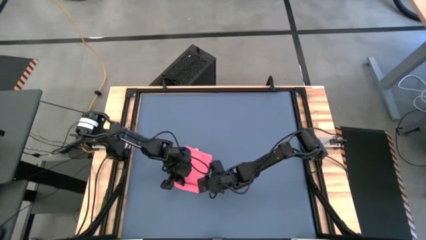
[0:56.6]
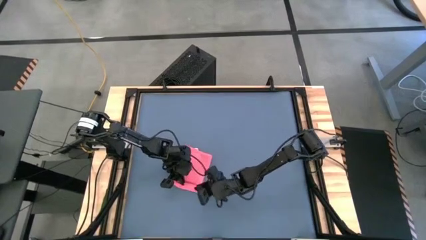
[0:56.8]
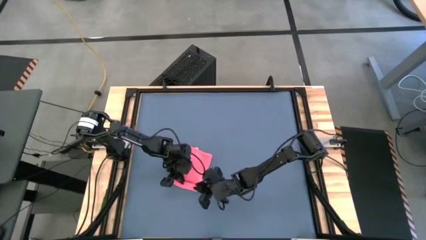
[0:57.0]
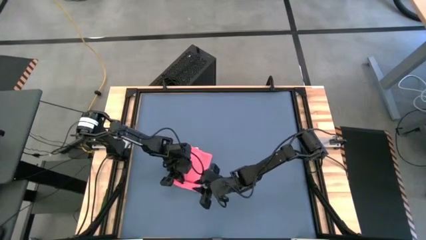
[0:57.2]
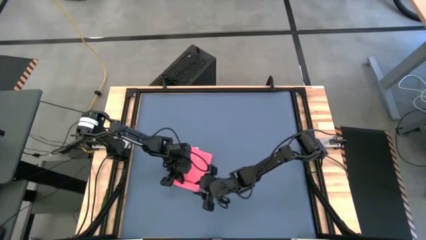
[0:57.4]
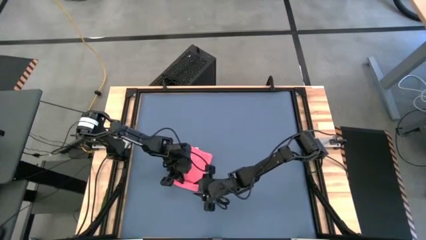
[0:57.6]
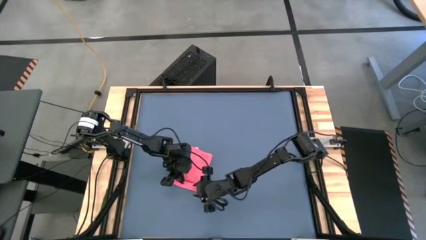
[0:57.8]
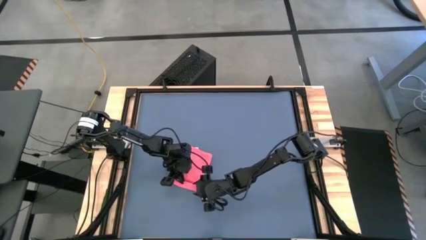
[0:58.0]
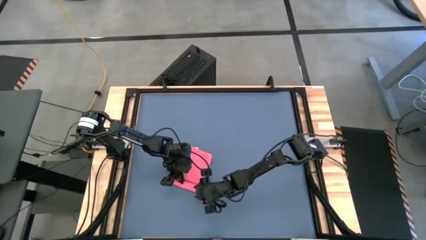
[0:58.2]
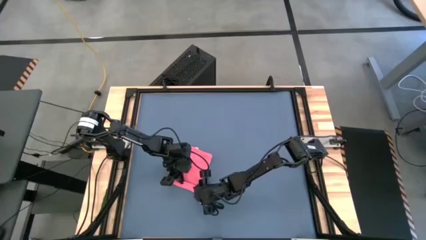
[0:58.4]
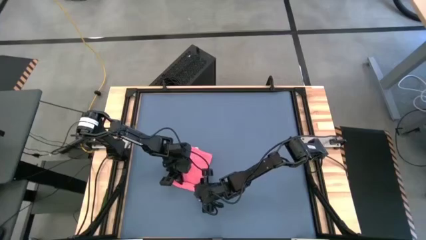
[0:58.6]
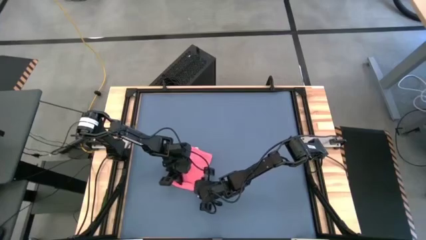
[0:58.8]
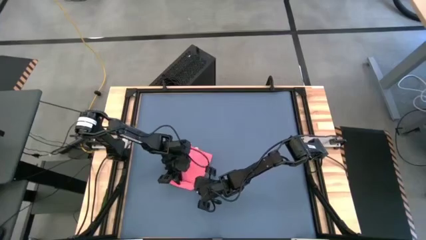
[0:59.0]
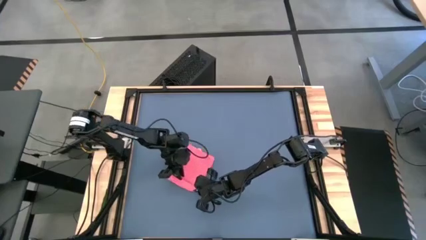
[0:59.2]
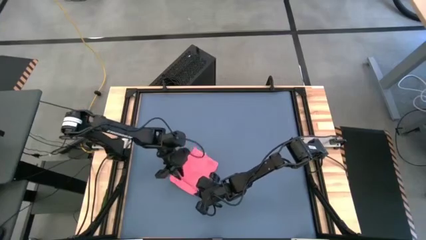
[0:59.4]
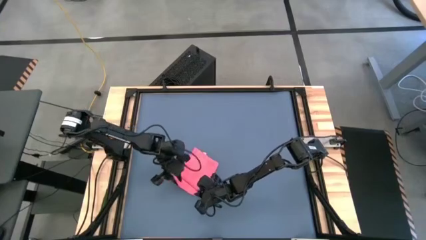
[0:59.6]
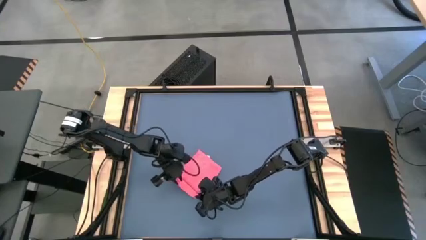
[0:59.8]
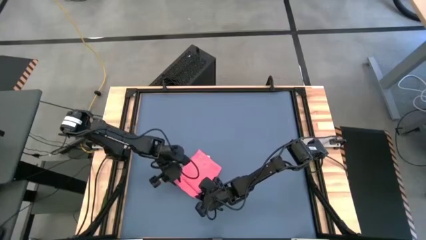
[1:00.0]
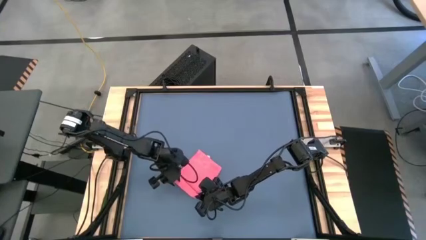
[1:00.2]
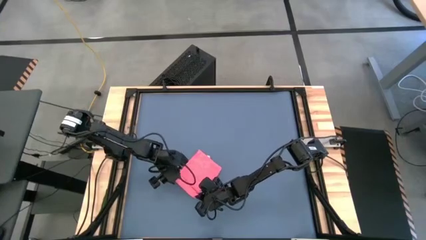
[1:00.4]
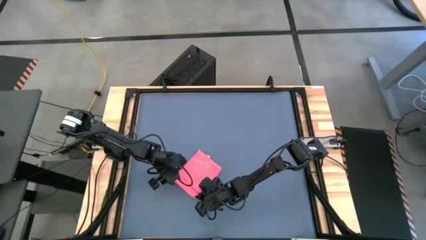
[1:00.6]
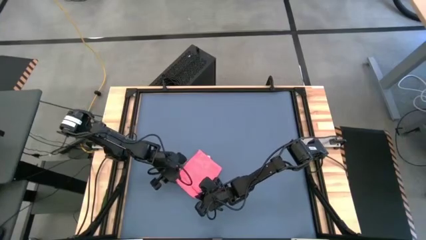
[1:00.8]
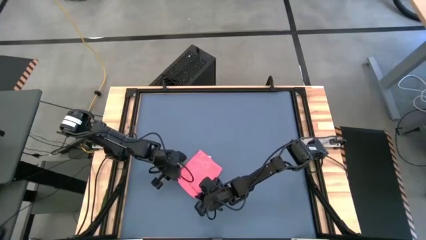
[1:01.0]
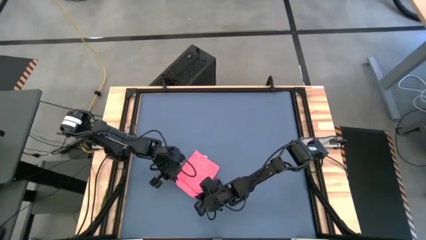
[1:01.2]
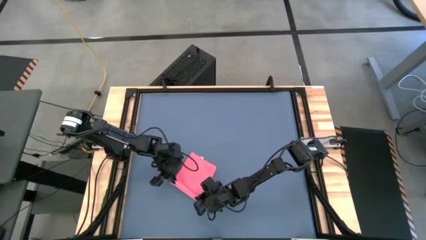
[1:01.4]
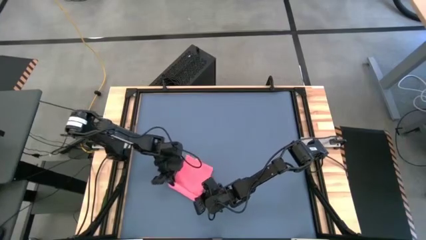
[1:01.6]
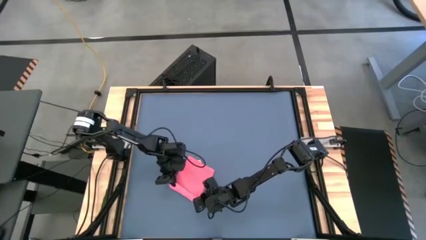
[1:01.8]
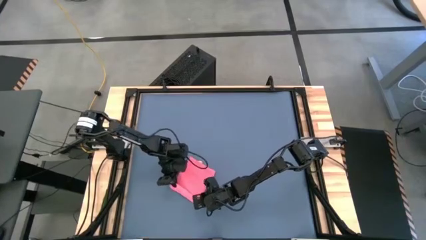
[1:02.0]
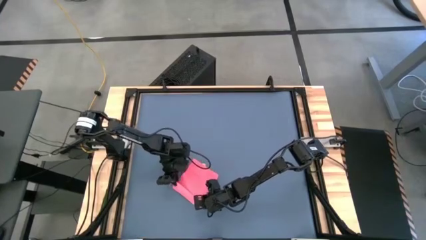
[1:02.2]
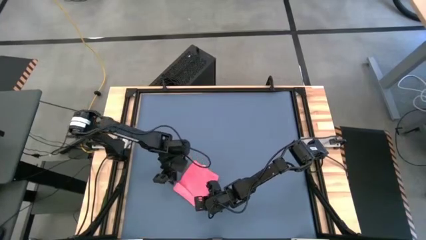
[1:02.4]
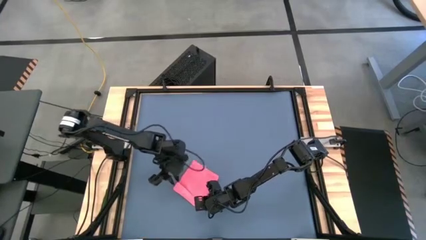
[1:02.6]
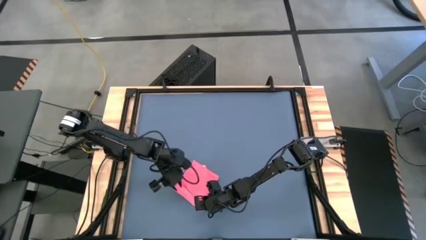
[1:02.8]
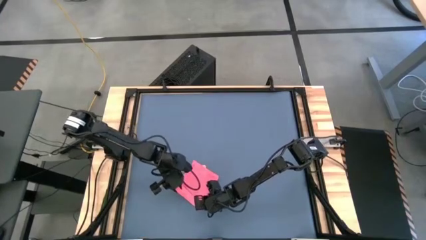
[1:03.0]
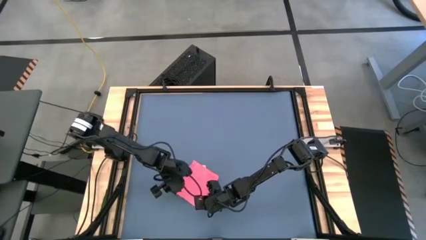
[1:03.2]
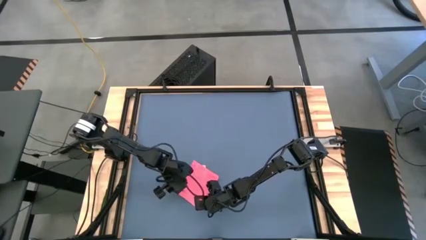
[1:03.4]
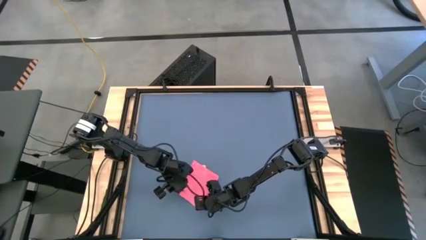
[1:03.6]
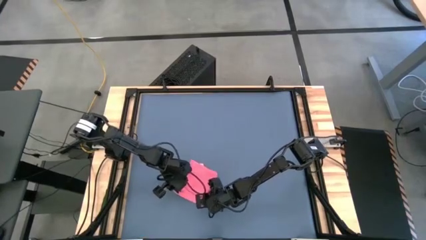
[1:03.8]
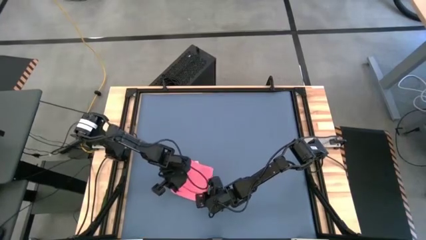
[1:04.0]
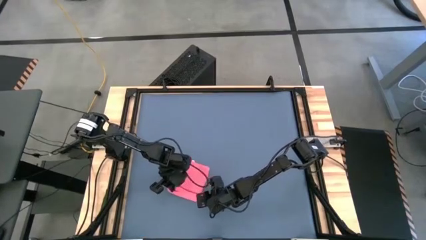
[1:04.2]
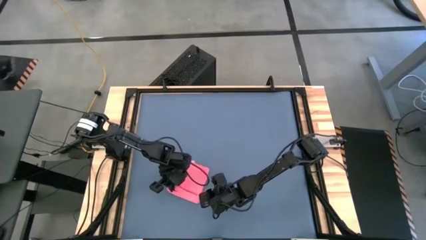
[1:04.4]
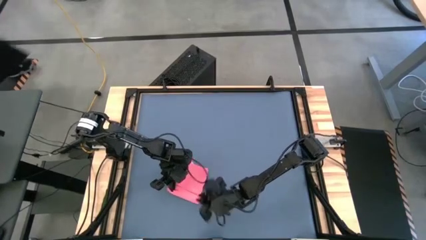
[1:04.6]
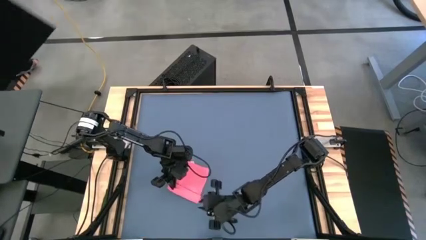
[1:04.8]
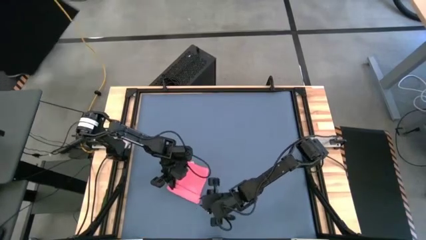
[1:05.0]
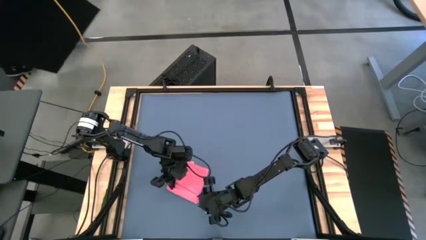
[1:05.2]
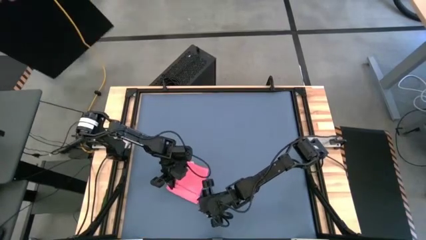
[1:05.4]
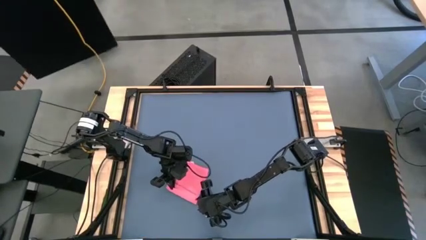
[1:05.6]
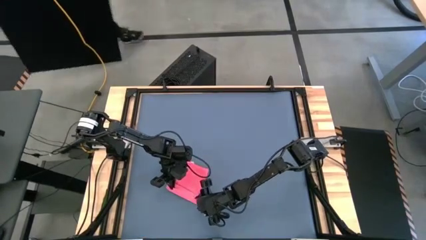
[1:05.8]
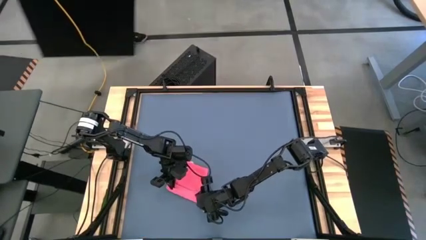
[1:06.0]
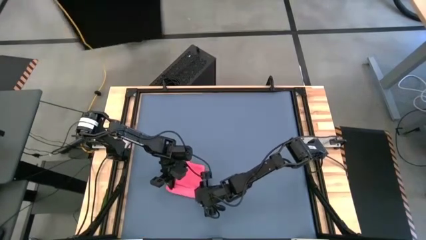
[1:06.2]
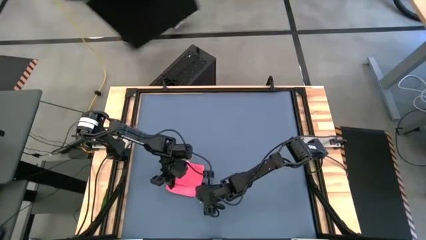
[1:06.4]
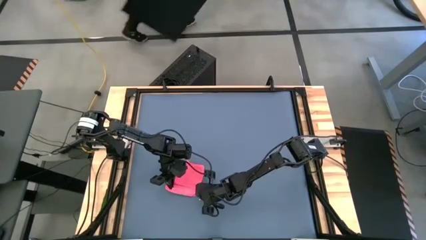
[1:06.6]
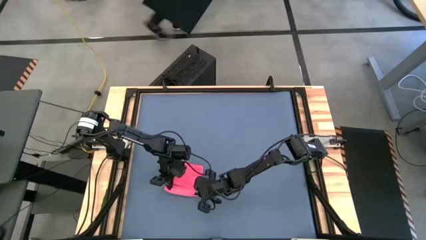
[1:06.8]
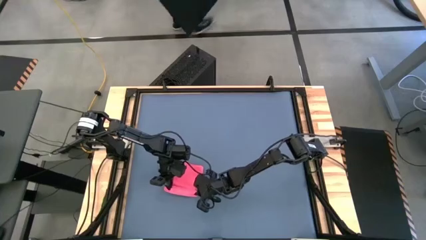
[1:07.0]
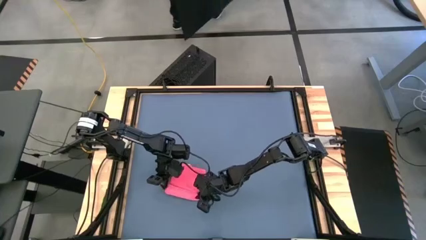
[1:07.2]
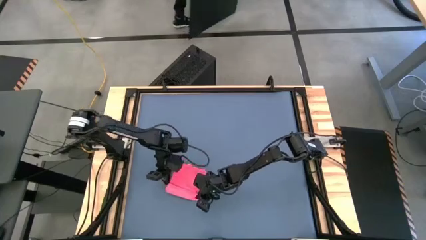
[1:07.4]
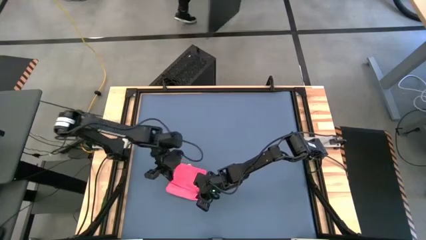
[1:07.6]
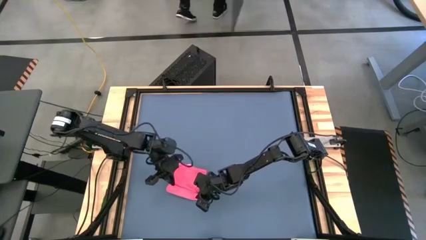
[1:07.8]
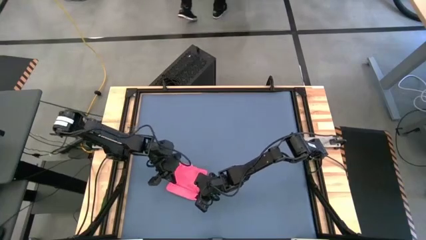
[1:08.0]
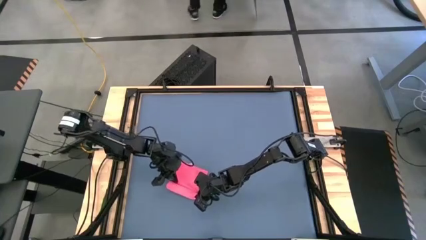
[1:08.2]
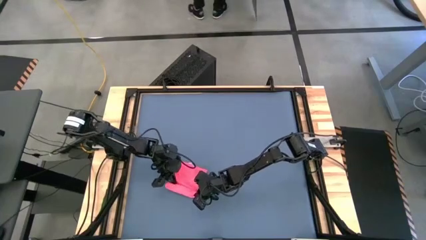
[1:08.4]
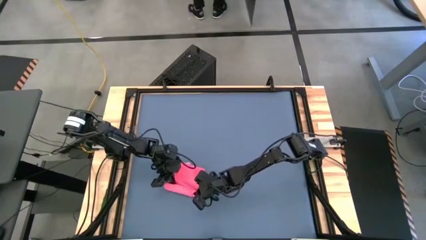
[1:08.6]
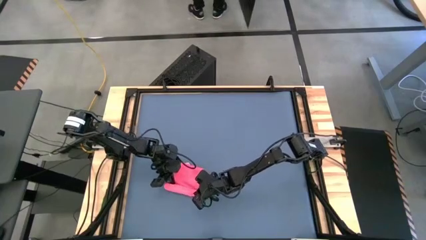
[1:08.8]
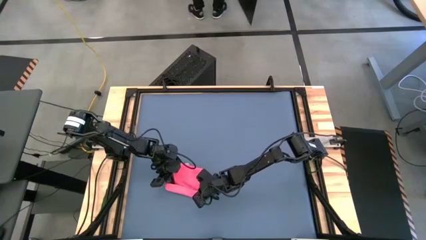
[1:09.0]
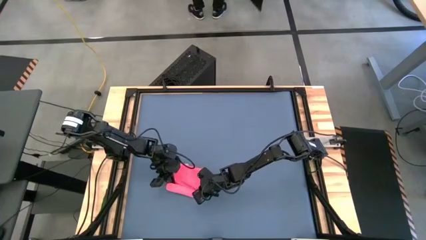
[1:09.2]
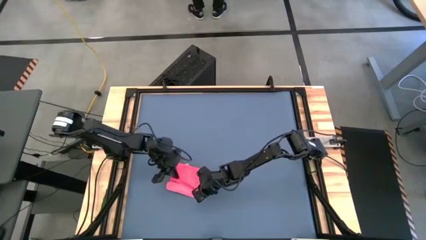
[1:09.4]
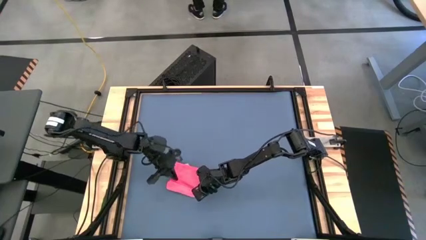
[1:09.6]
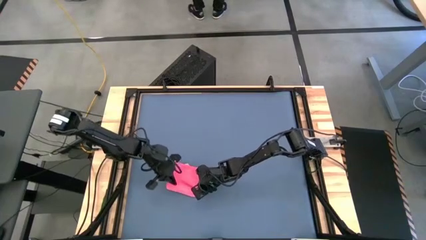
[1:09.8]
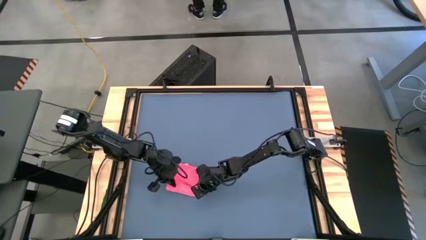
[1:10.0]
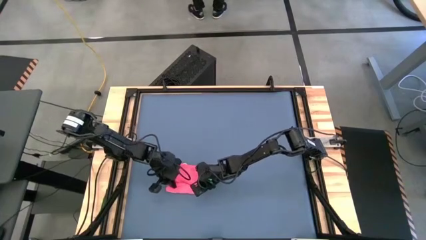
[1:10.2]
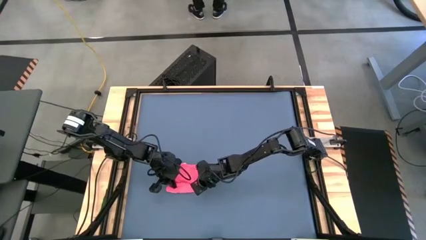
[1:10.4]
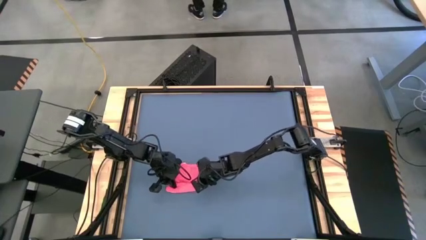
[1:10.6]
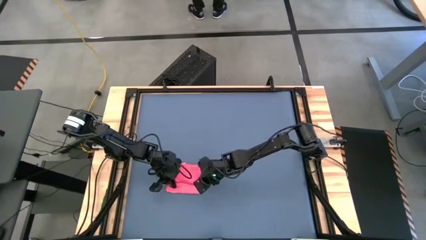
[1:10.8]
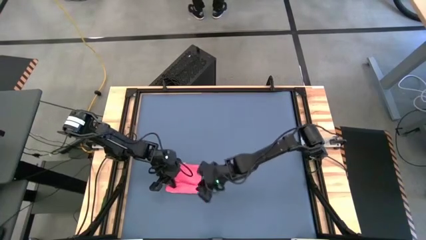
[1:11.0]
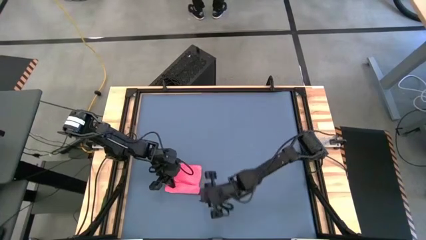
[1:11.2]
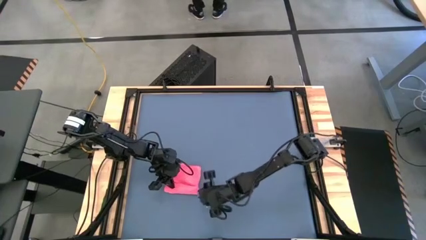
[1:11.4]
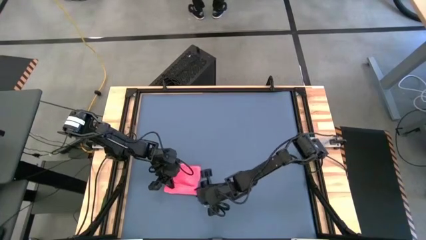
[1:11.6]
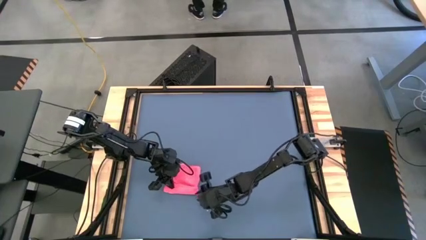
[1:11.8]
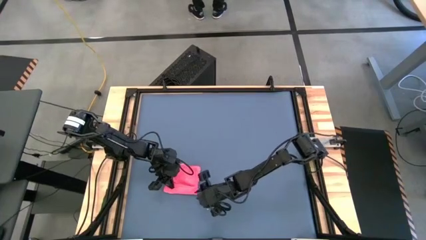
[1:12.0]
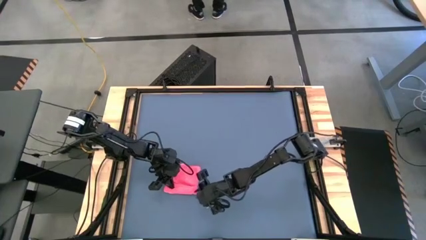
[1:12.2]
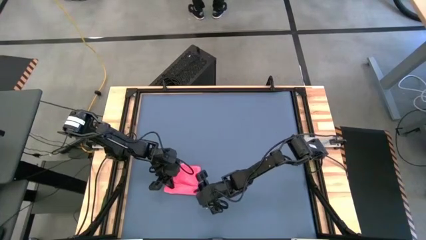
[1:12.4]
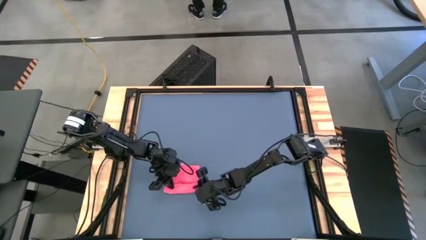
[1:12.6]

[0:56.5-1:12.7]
Task: Roll towel
Roll the red microfiber cloth
